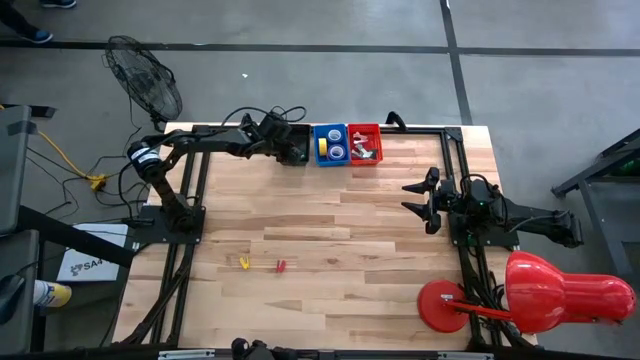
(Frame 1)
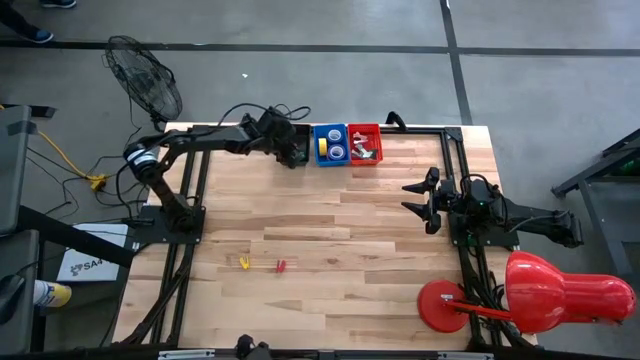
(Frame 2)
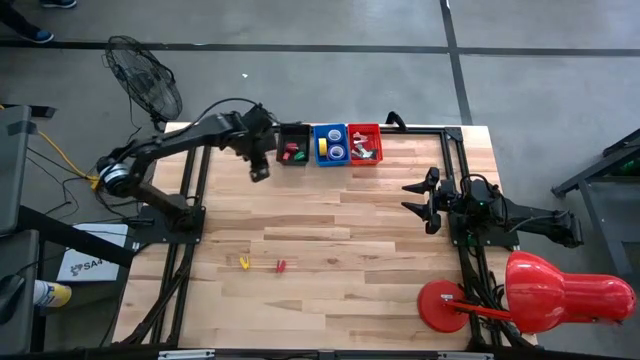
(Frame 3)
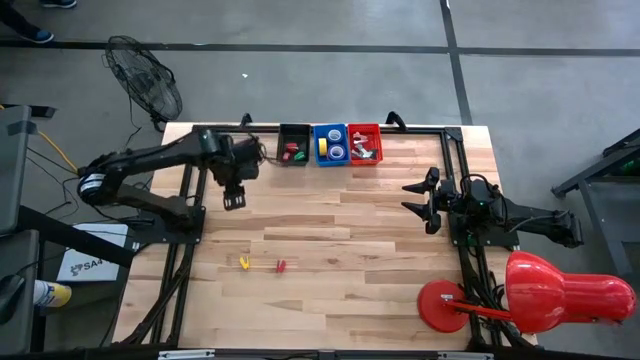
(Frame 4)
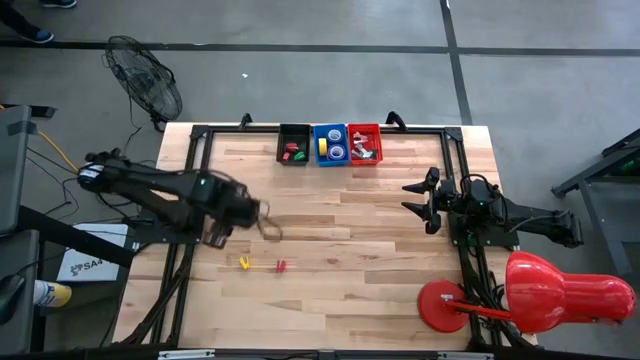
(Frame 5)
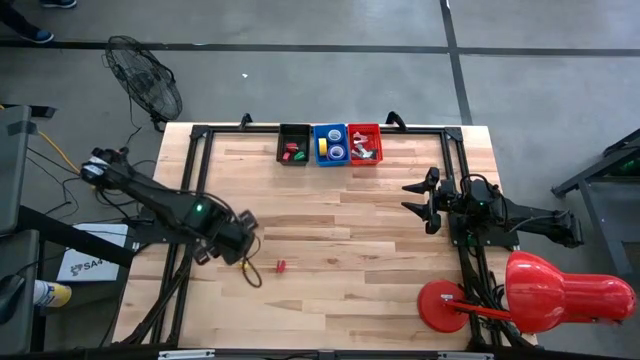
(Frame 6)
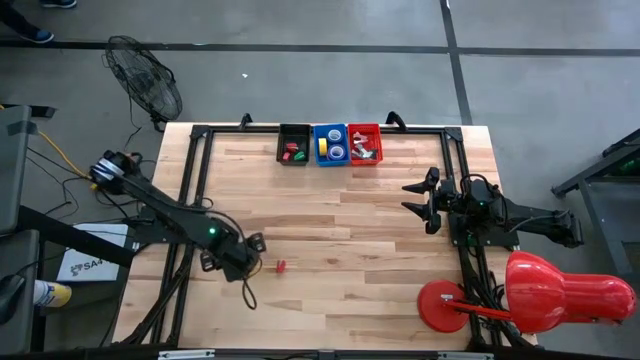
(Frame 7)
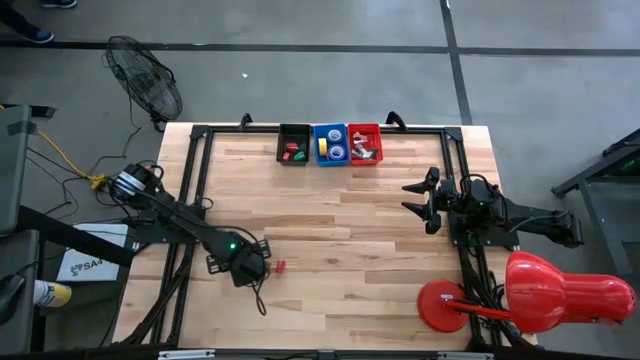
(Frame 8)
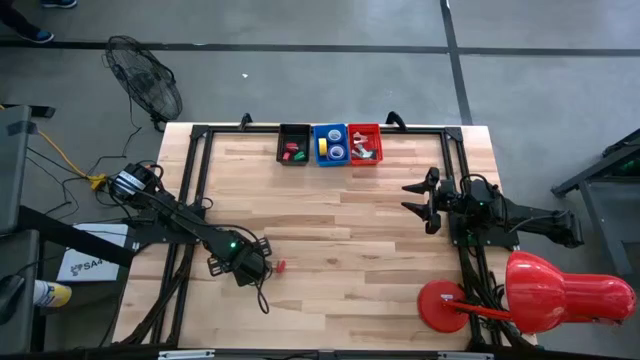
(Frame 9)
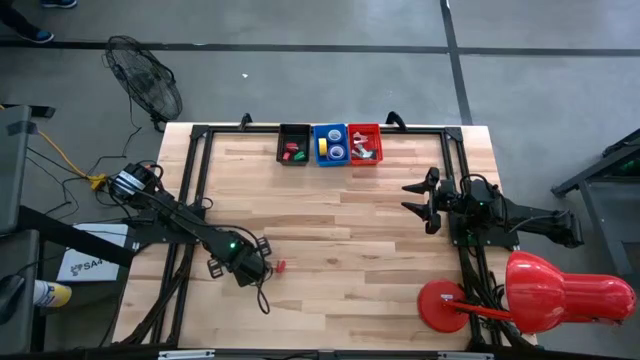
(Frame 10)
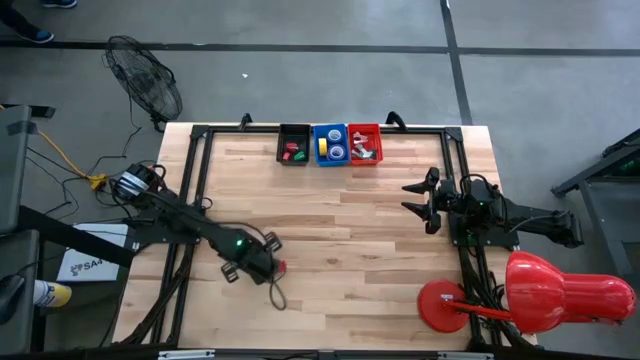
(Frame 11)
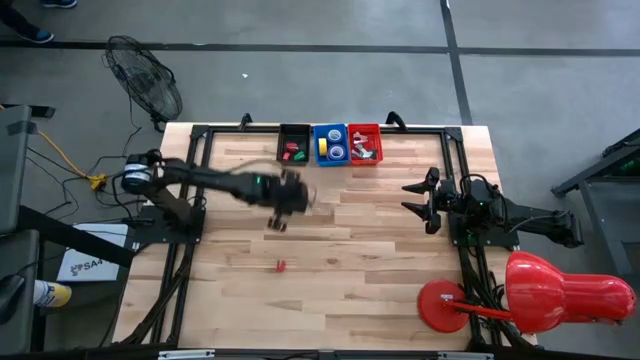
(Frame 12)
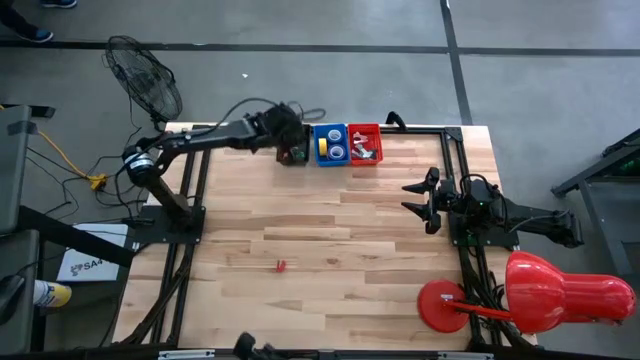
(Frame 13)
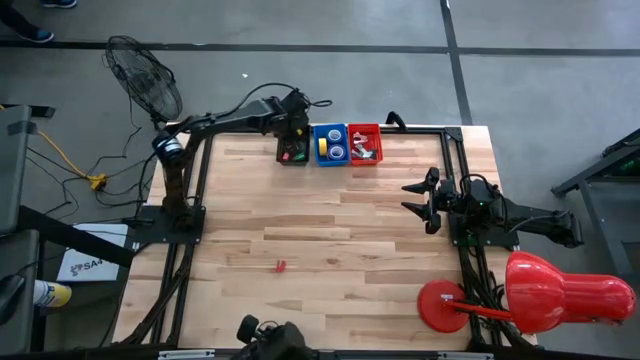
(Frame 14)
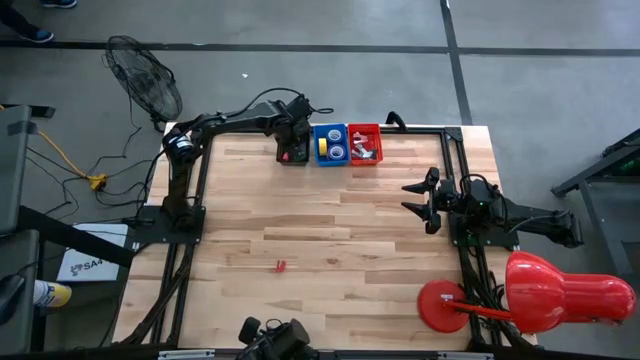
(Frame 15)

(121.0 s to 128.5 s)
Task: Pick and place Stapler, Stapler remover, tape
Put the yellow stapler into the black bin

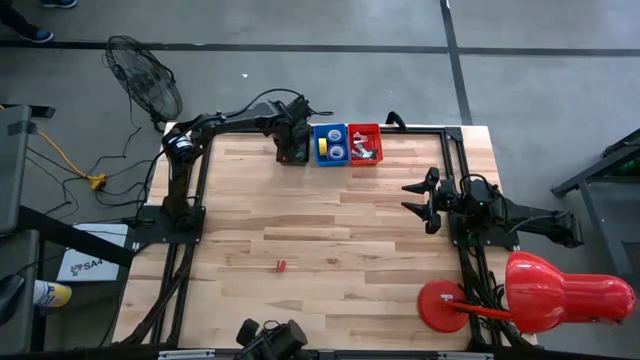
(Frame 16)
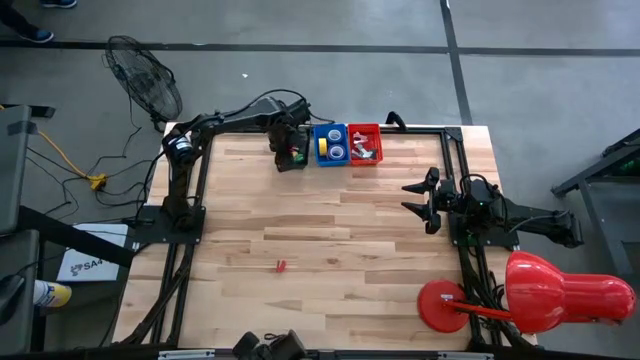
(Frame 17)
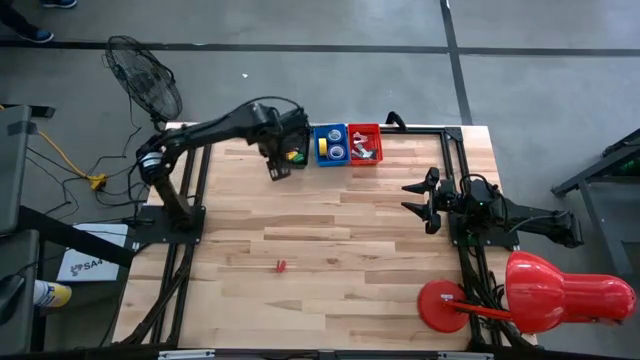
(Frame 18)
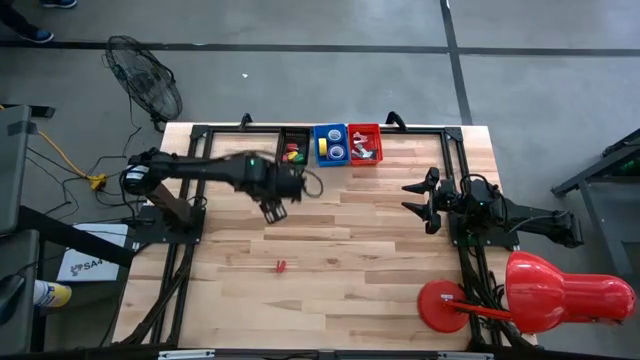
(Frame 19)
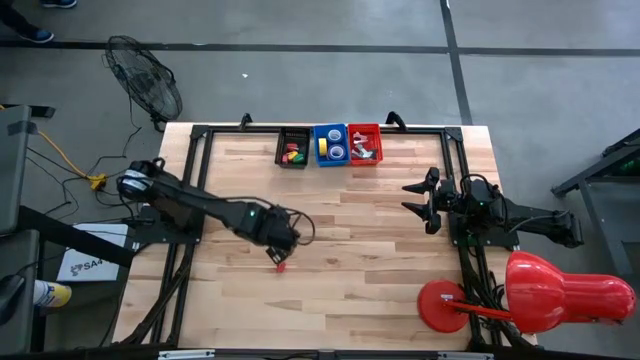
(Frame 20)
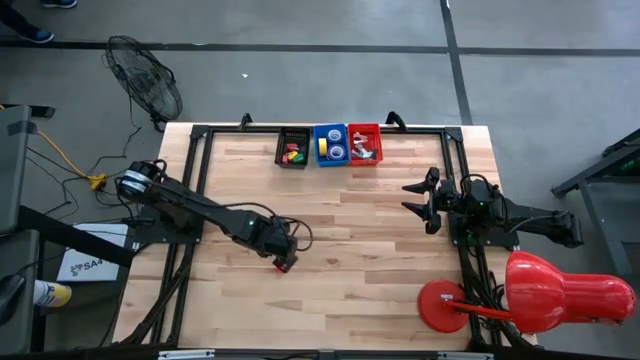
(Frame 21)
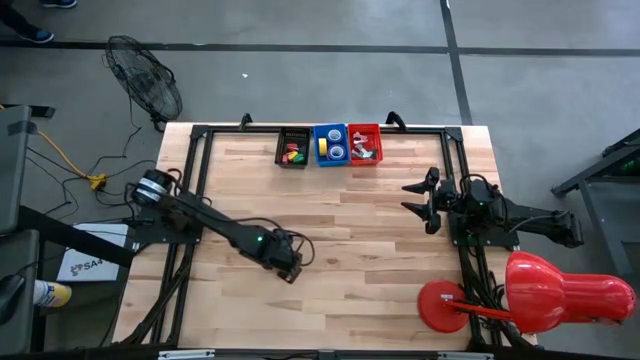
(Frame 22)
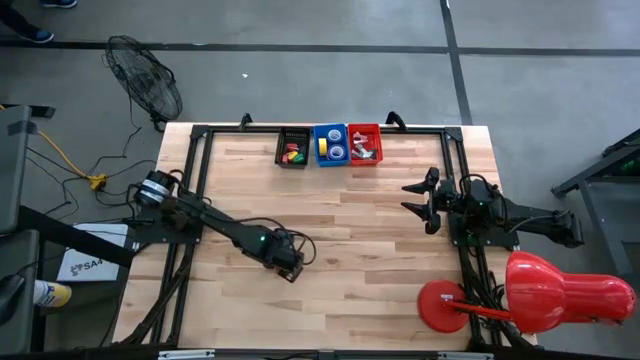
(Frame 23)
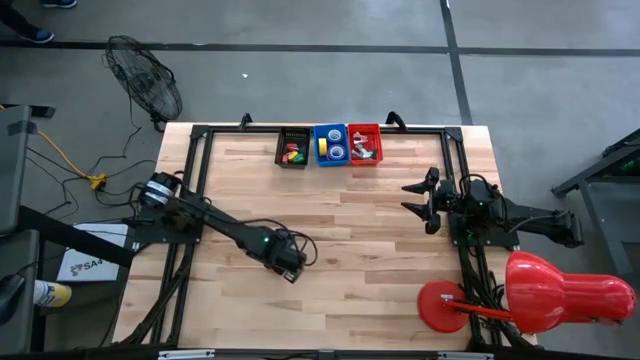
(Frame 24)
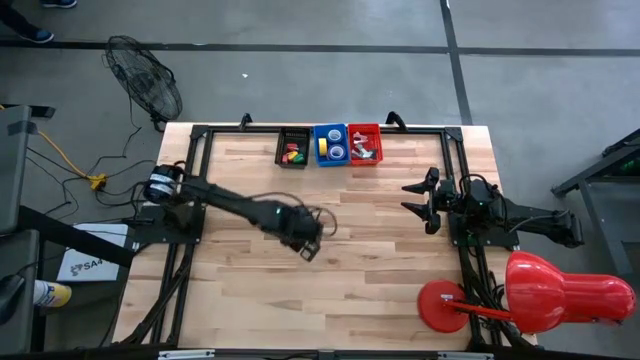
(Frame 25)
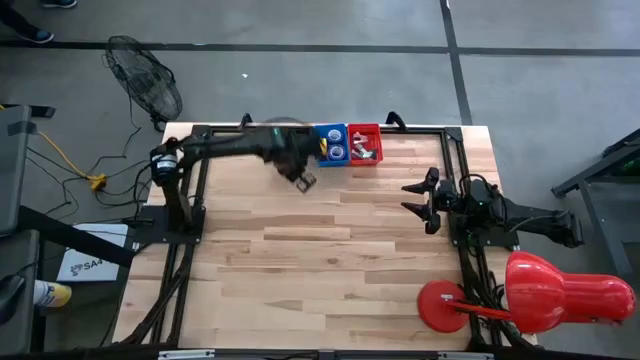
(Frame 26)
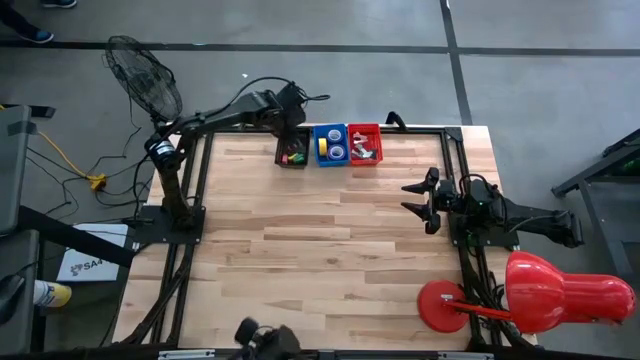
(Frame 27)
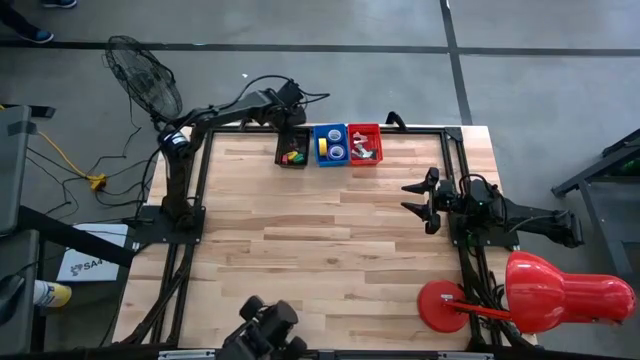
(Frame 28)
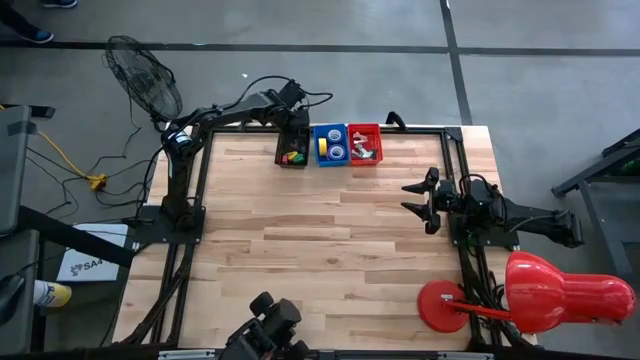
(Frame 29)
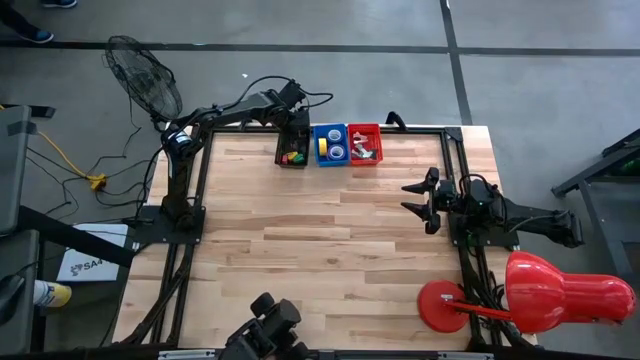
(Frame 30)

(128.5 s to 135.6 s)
Put the red stapler into the black bin

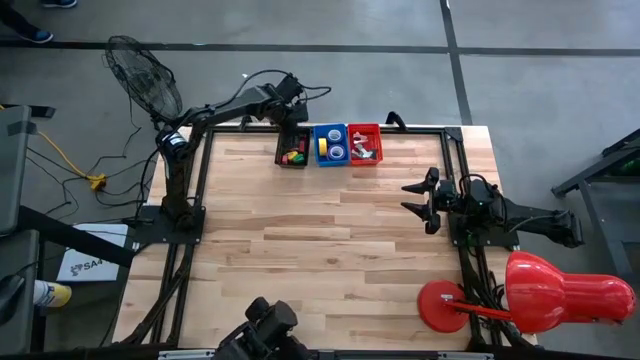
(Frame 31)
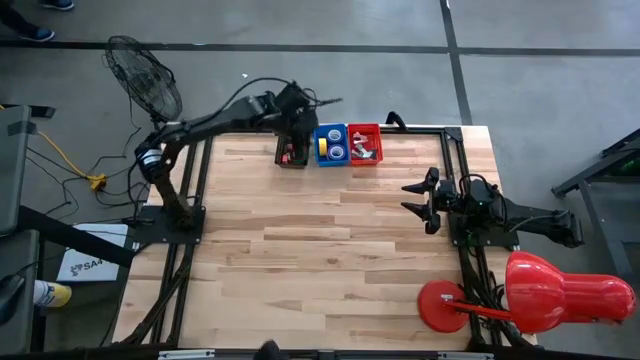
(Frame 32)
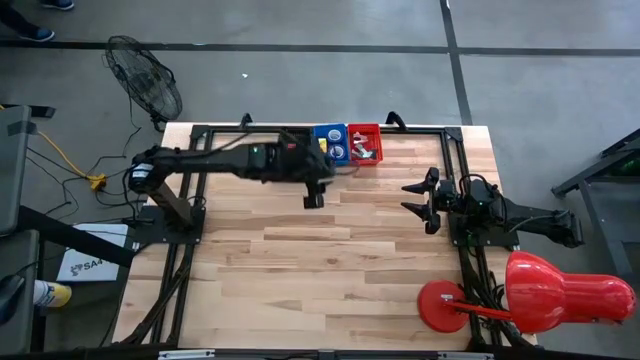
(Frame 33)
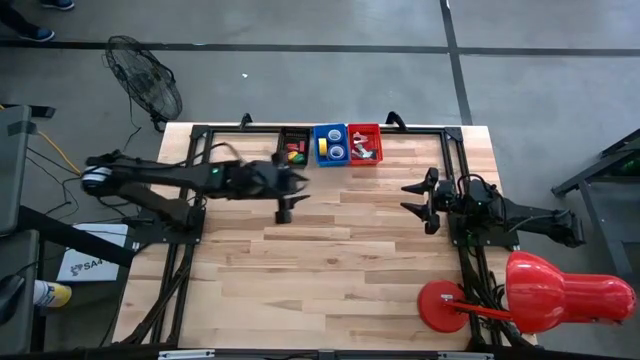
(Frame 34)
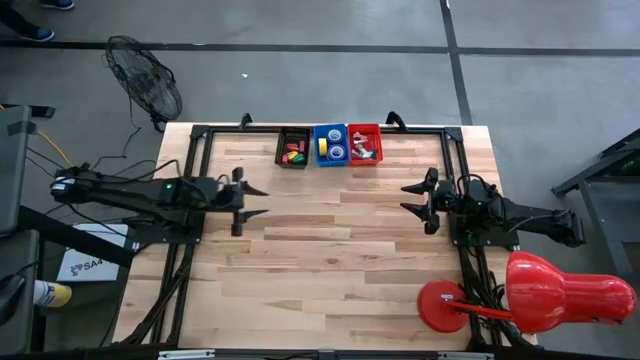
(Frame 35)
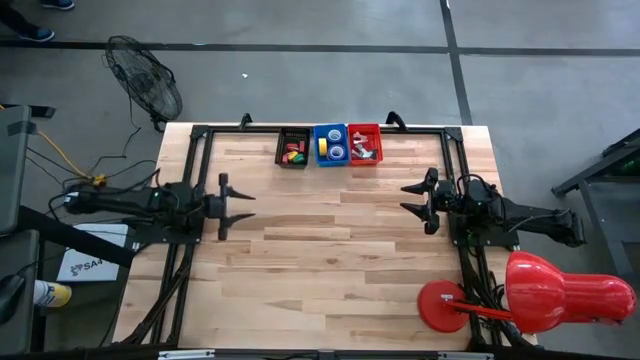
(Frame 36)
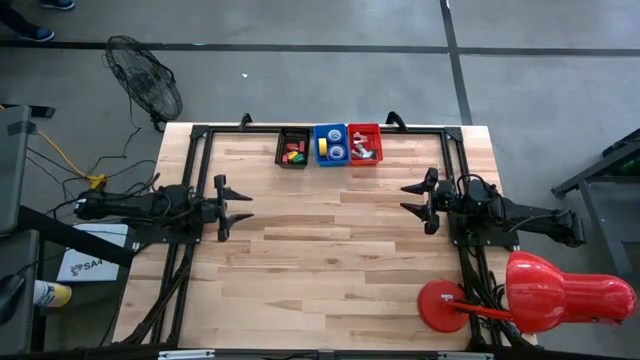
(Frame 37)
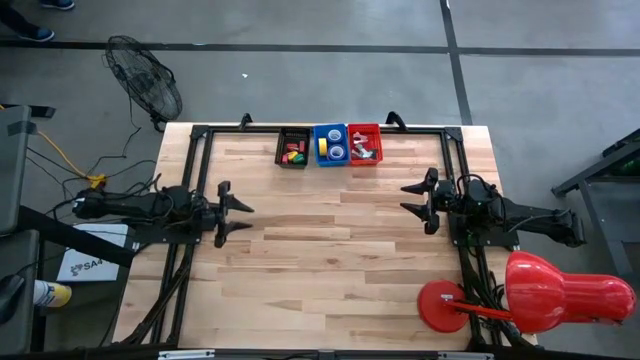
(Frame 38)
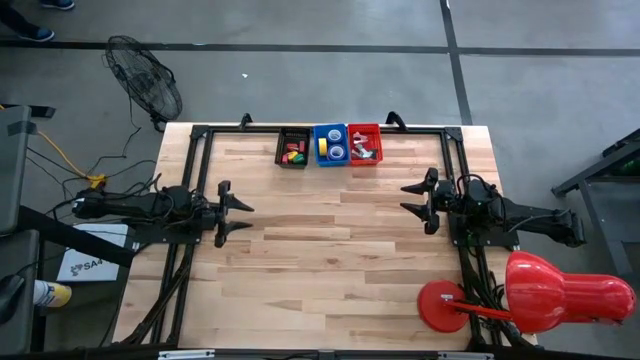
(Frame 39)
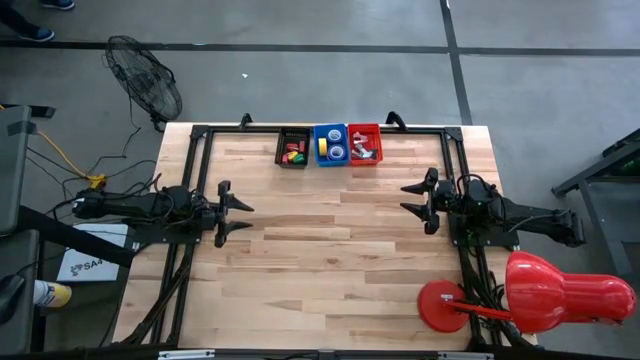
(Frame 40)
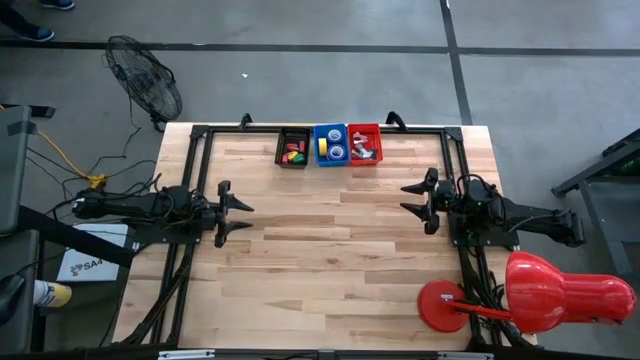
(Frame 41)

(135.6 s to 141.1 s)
Return to Home Position
